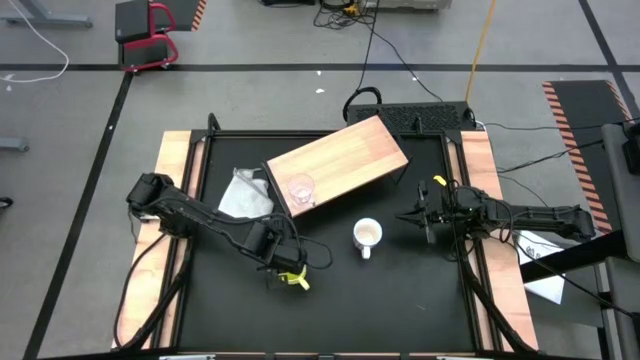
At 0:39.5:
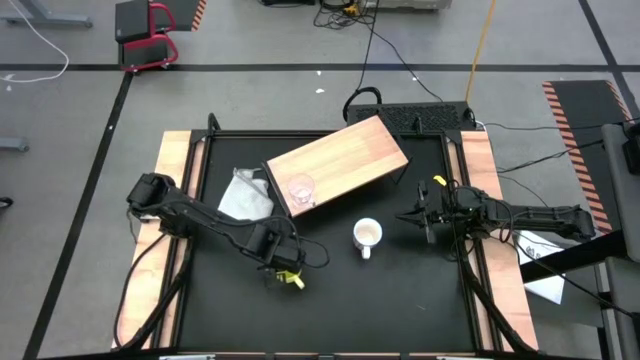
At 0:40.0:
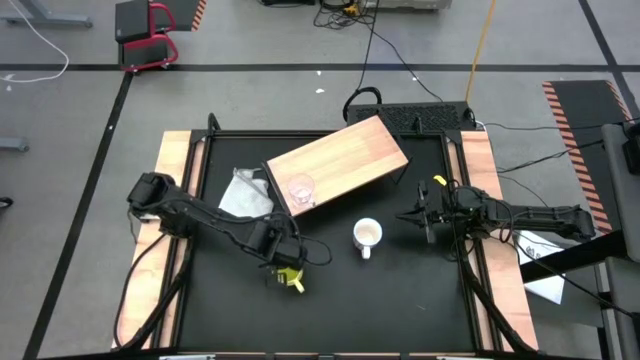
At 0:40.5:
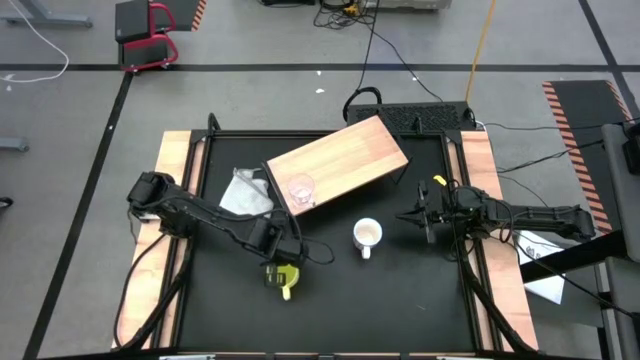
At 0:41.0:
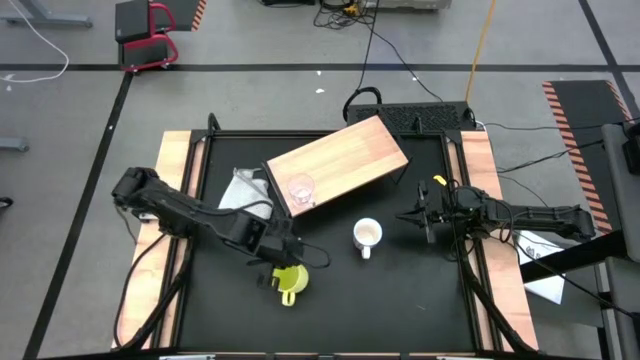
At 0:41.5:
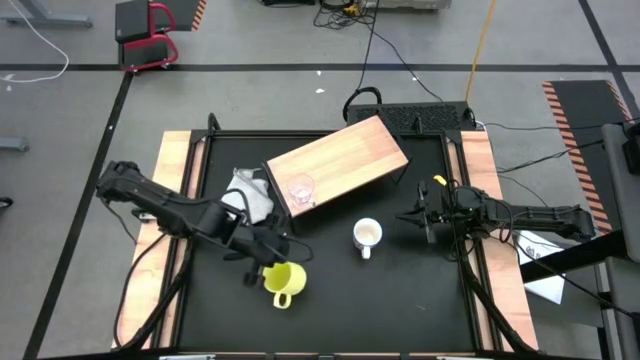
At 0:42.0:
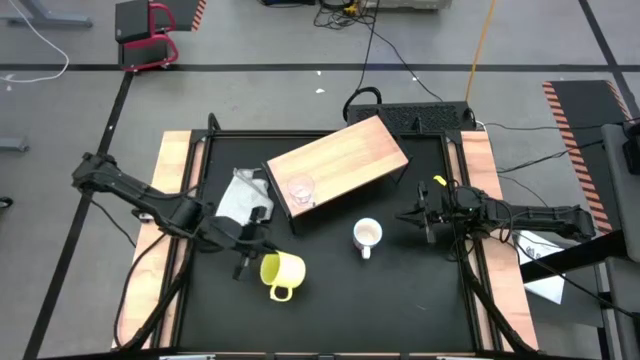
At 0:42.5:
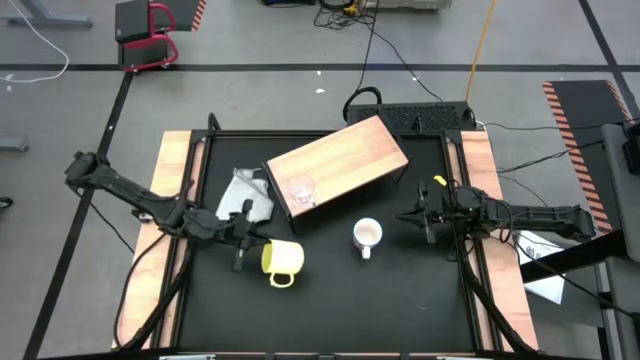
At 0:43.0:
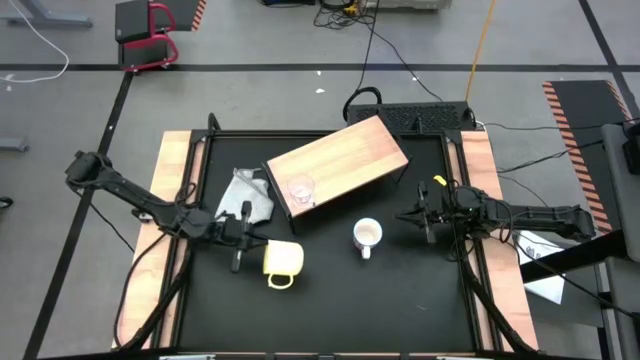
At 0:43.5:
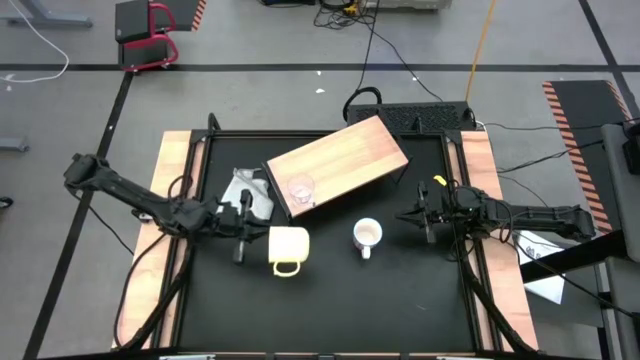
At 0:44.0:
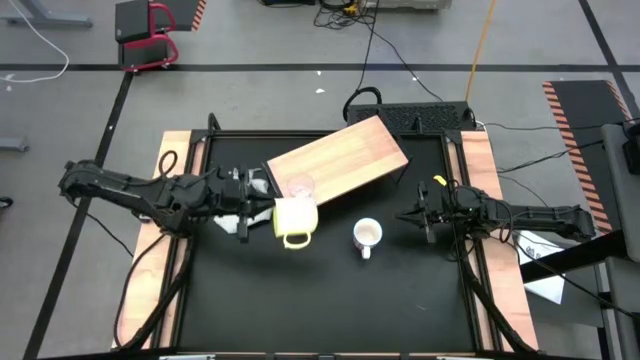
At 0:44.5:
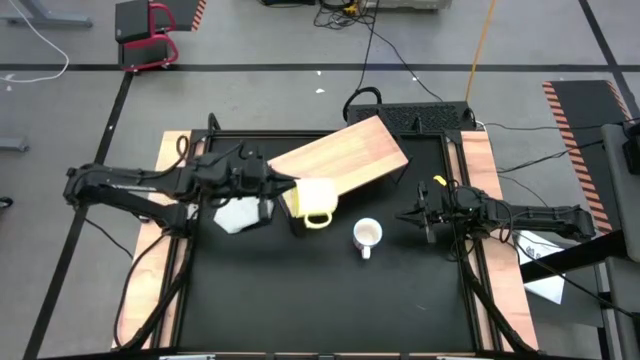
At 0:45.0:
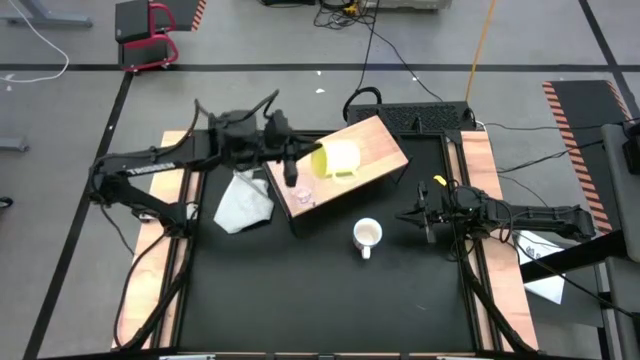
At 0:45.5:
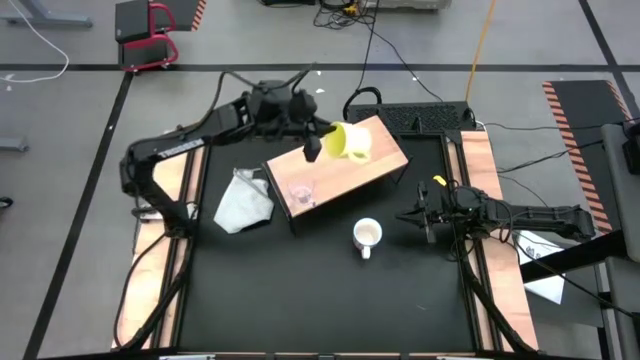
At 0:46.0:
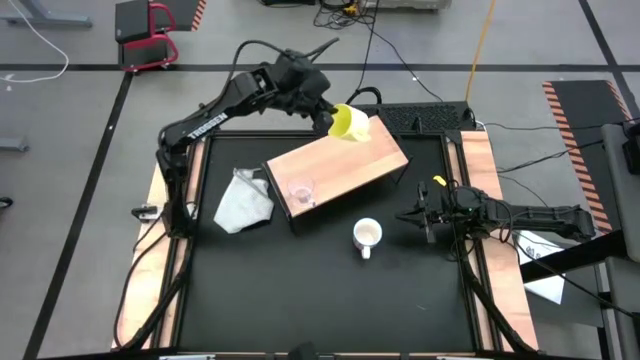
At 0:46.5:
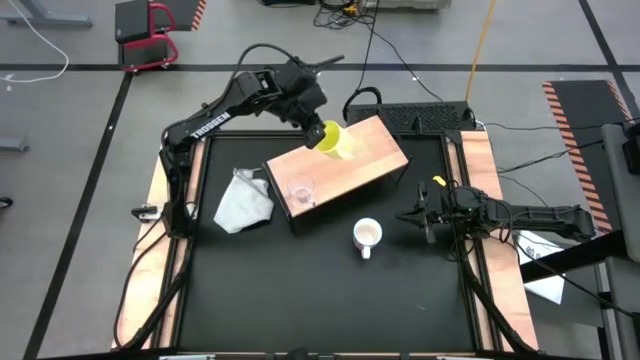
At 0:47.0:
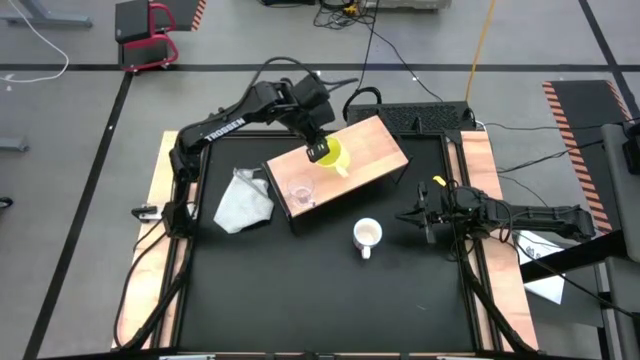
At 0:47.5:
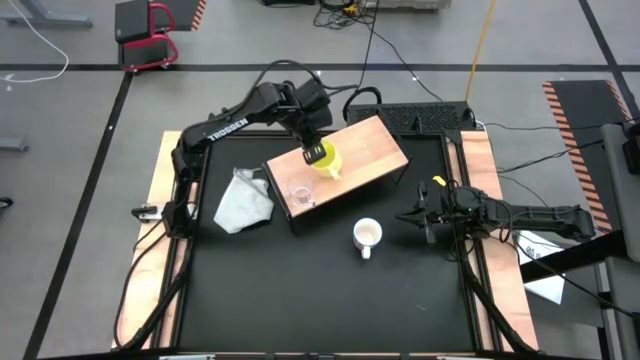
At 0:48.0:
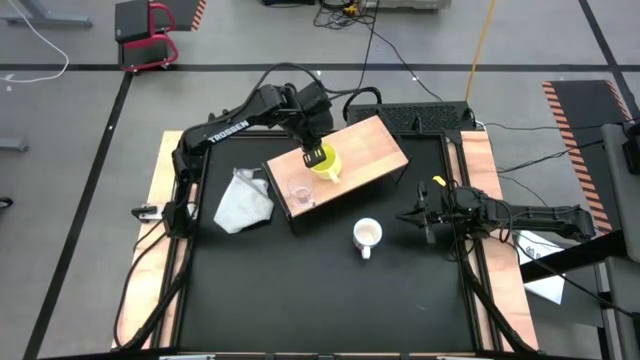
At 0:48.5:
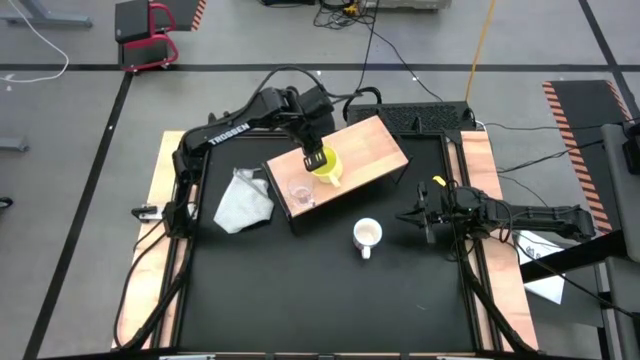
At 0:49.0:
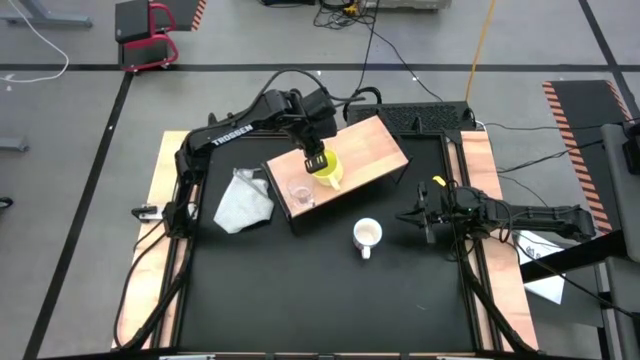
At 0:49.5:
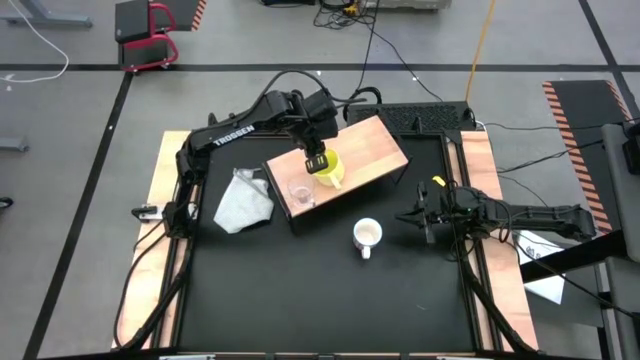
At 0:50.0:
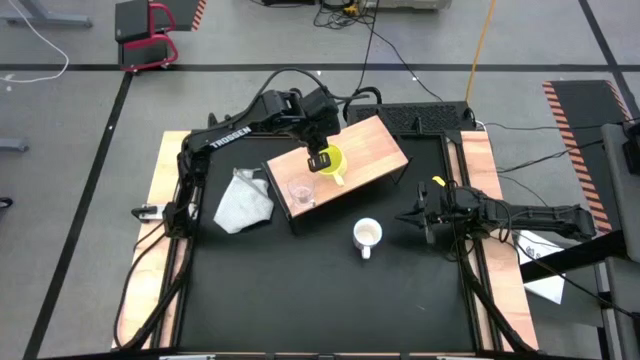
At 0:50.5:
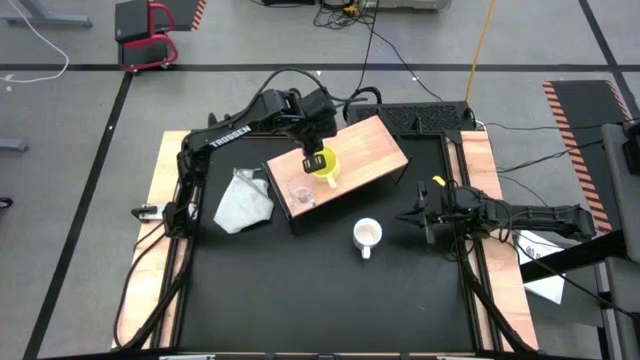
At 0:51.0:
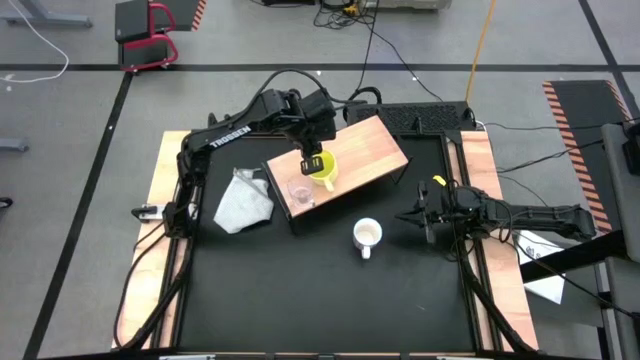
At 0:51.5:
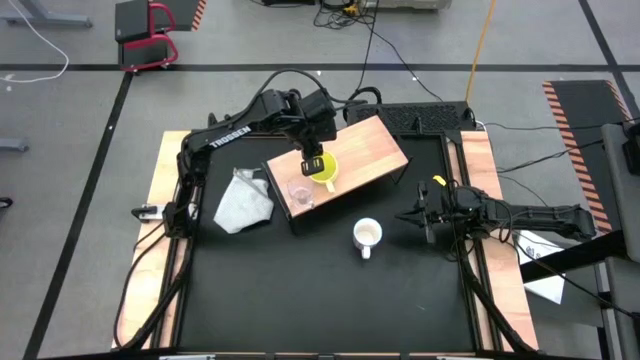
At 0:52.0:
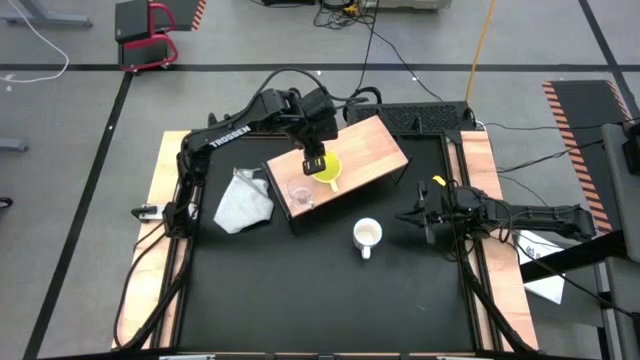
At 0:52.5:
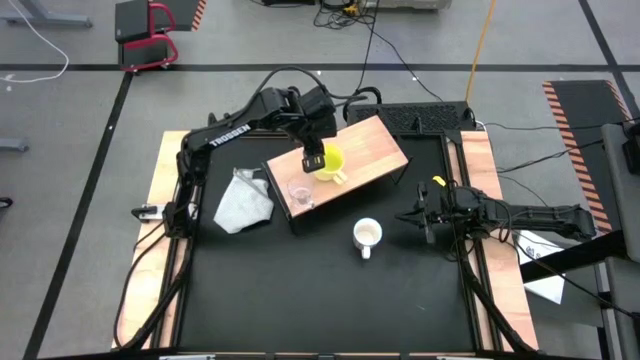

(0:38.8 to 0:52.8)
Task: Stack small to large cups/mugs on shelf
Put the yellow mug on the shelf

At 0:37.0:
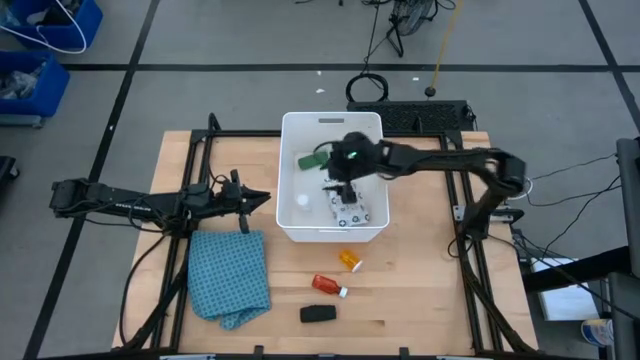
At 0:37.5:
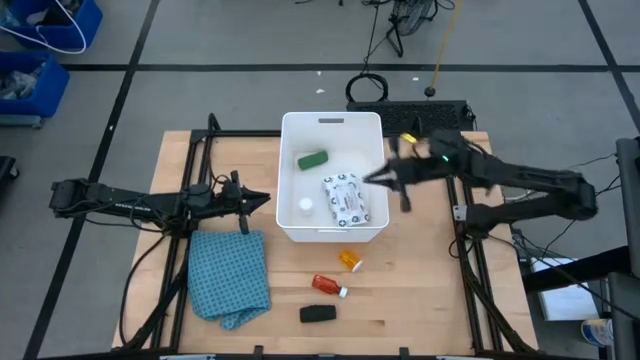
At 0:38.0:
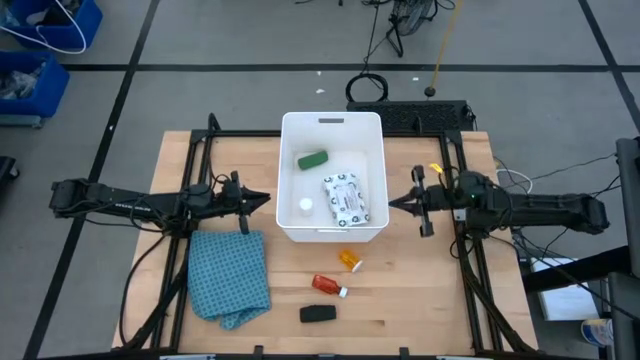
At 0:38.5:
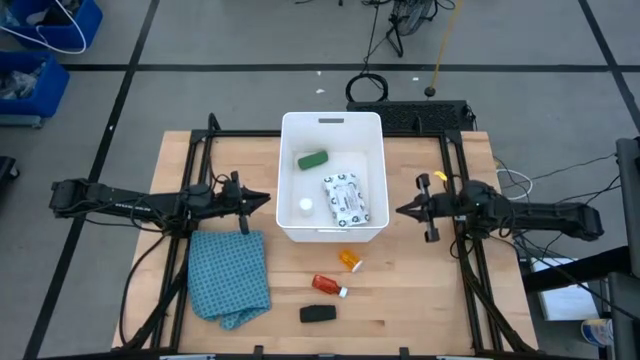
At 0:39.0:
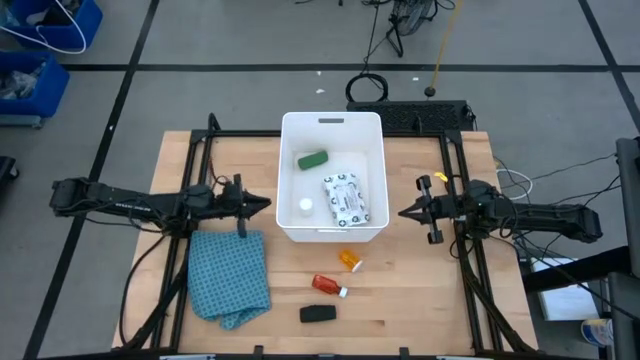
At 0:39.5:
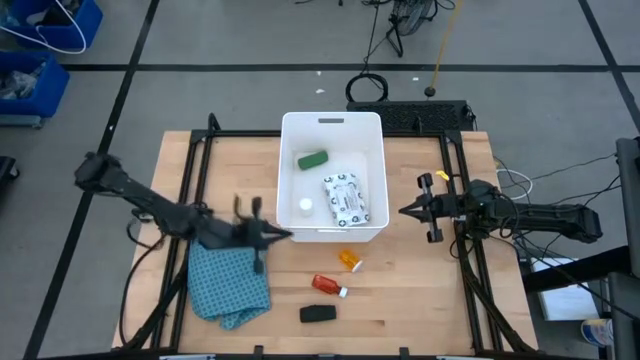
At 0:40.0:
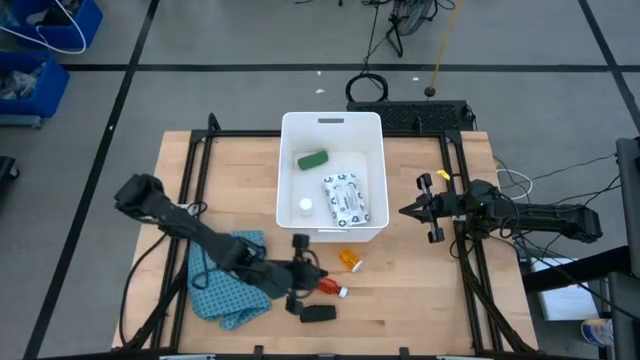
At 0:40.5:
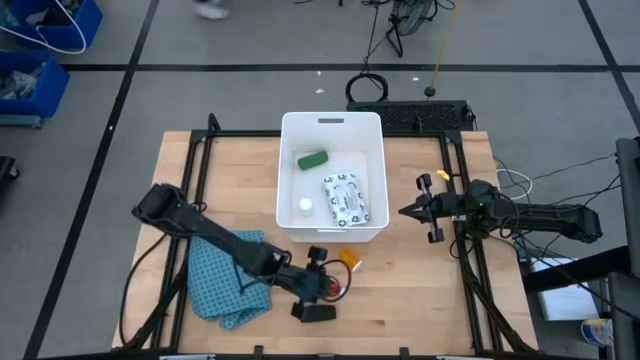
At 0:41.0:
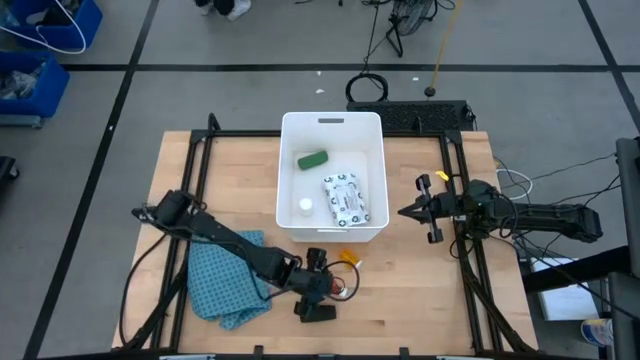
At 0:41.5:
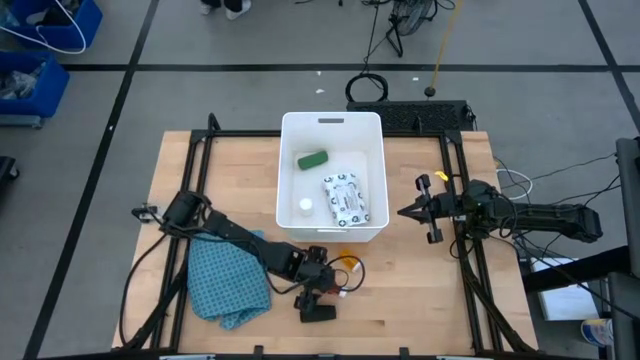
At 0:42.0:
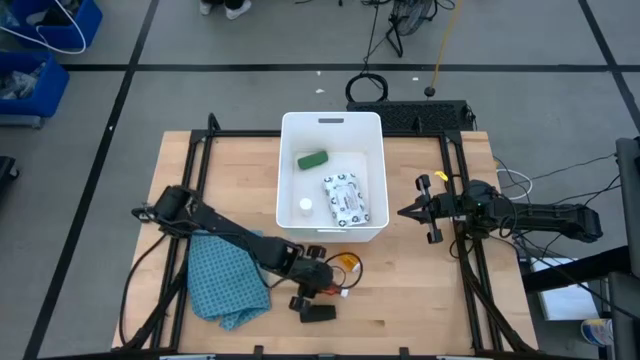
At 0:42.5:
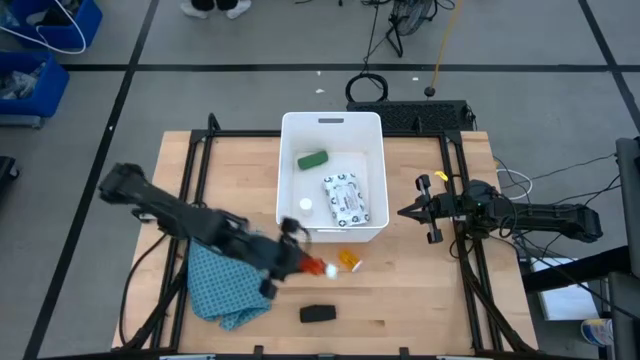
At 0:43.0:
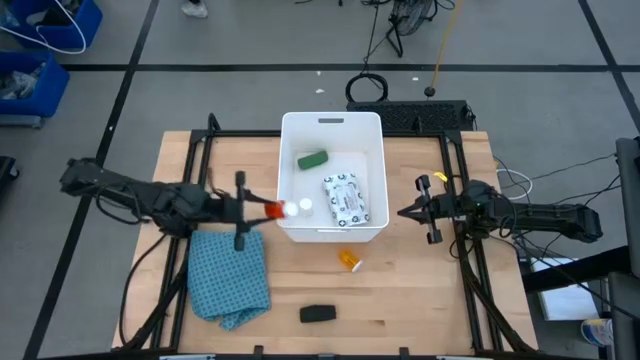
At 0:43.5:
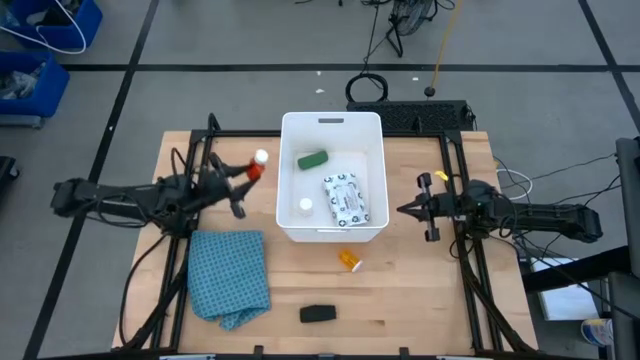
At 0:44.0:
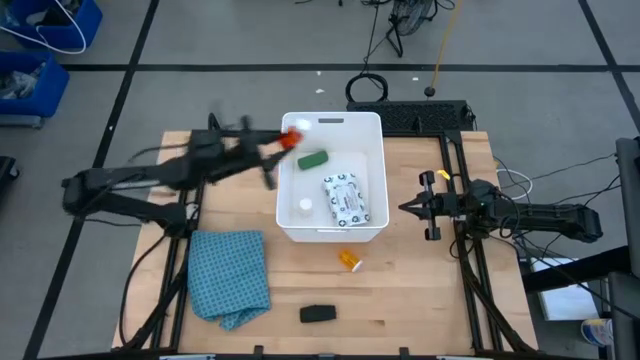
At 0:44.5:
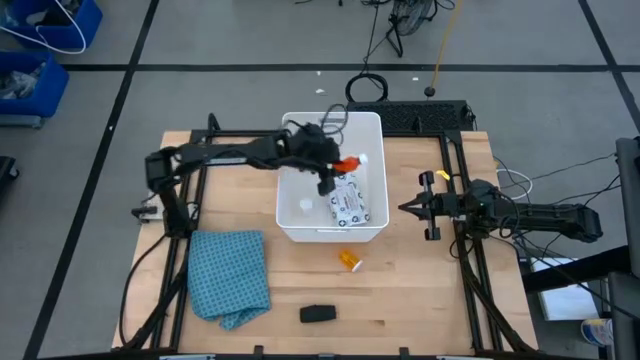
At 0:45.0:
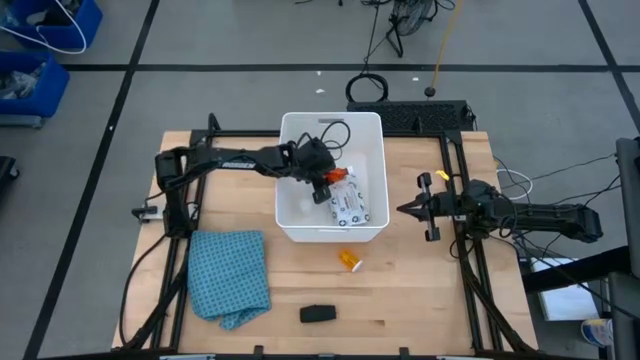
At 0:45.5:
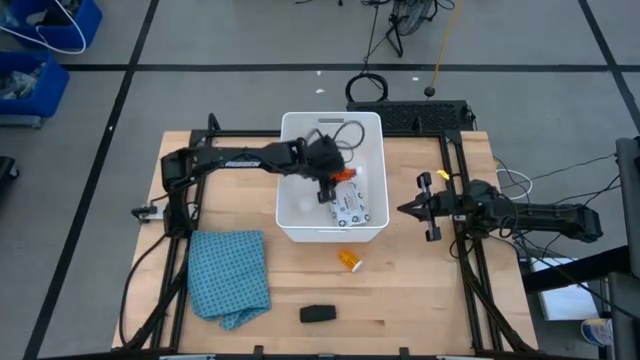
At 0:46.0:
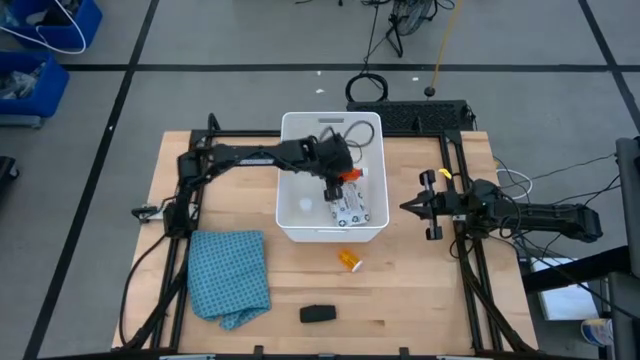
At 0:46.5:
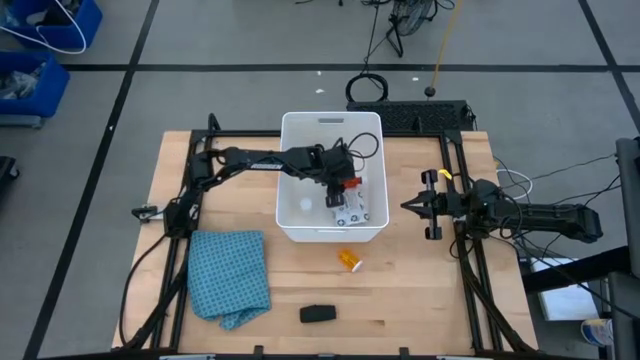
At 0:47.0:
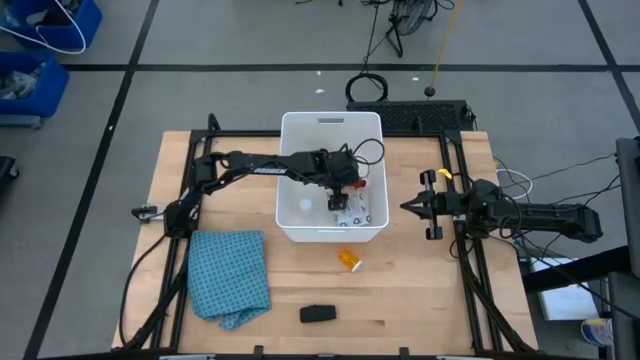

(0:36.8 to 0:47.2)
Task: Pick & place medical supplies in basket/bin
Put the red pill bottle into the white bin
